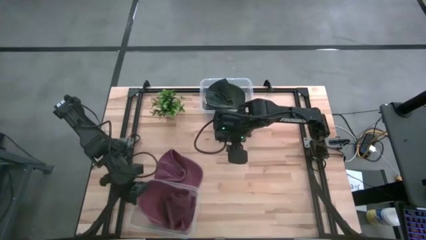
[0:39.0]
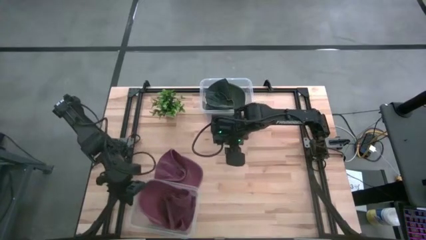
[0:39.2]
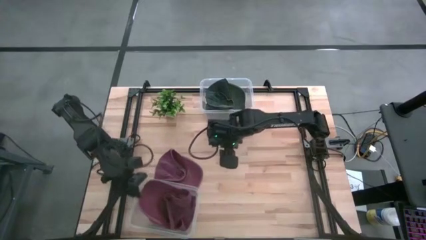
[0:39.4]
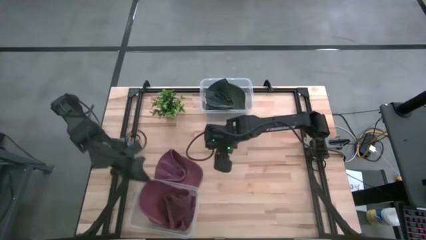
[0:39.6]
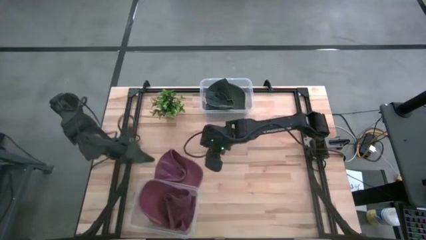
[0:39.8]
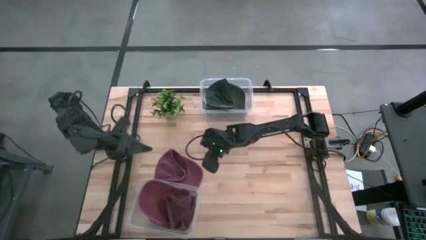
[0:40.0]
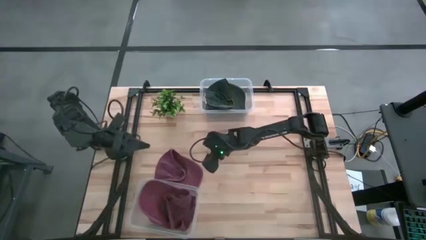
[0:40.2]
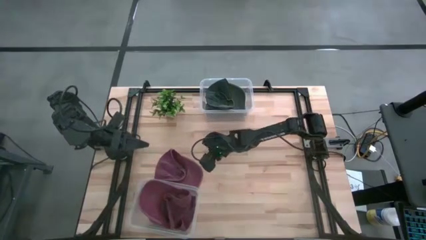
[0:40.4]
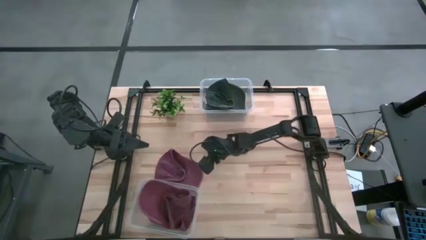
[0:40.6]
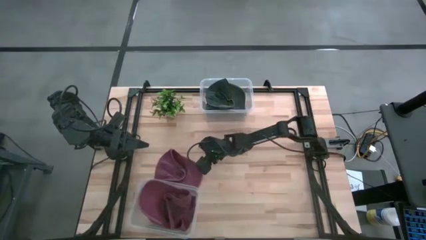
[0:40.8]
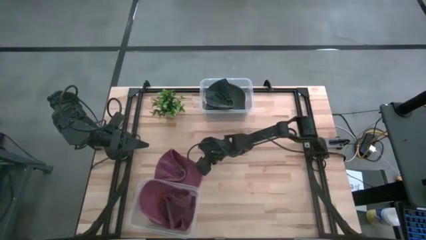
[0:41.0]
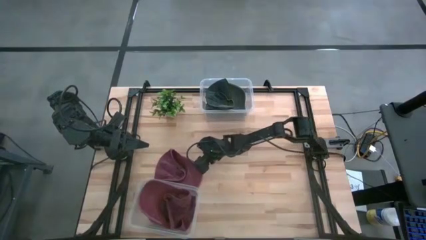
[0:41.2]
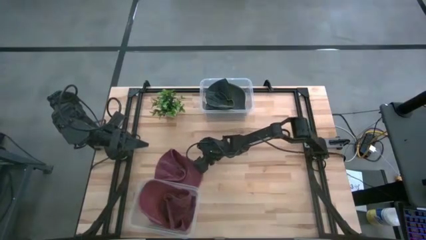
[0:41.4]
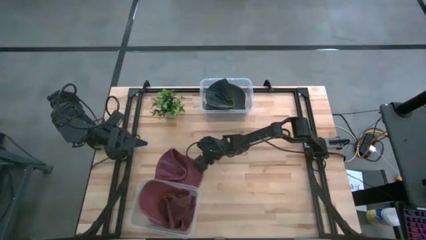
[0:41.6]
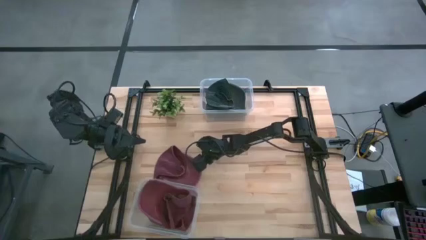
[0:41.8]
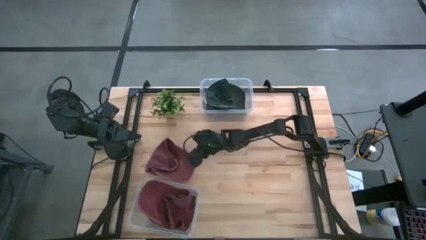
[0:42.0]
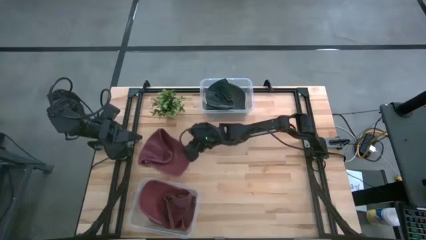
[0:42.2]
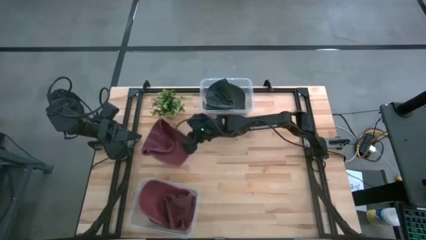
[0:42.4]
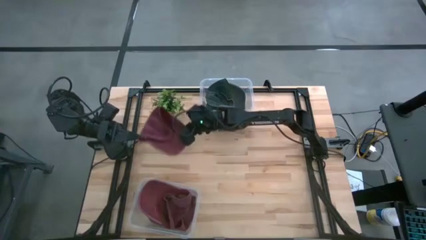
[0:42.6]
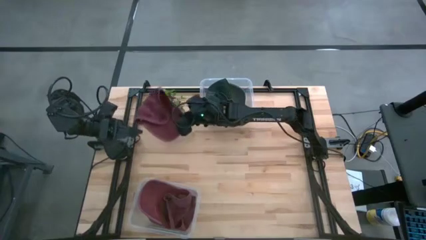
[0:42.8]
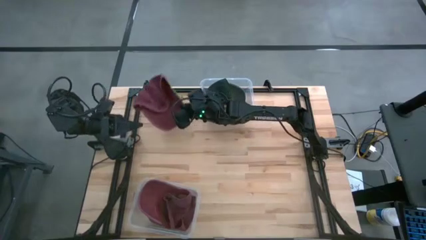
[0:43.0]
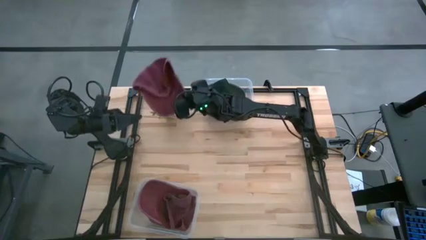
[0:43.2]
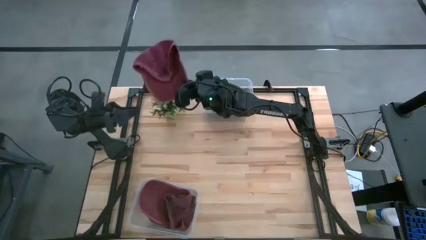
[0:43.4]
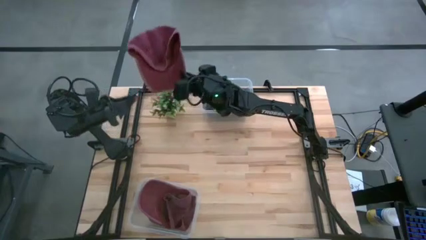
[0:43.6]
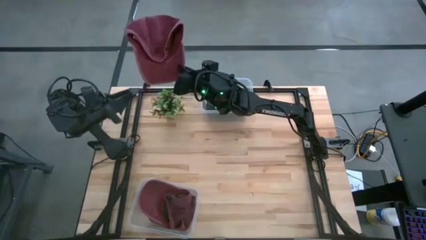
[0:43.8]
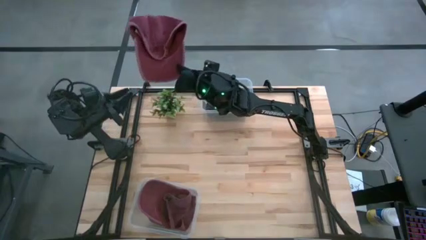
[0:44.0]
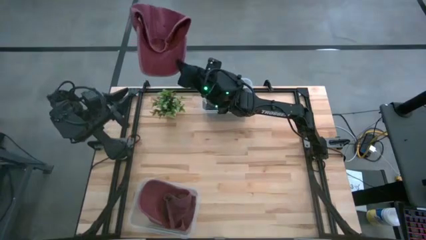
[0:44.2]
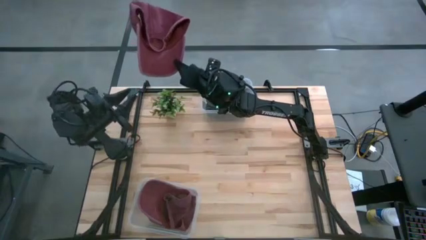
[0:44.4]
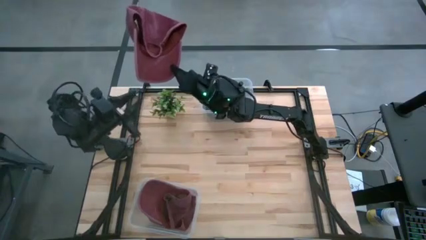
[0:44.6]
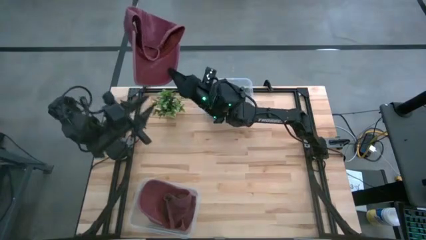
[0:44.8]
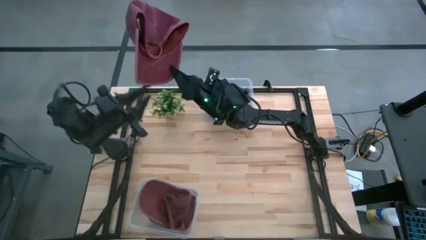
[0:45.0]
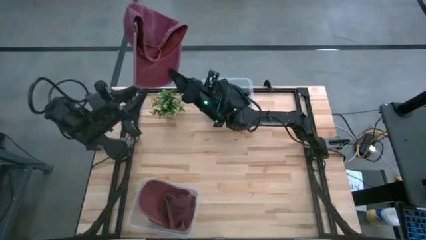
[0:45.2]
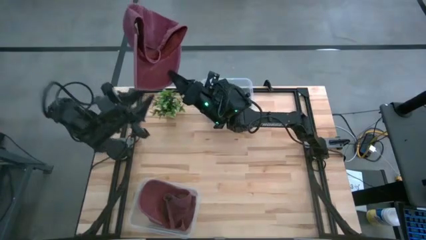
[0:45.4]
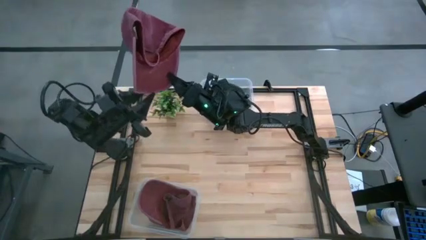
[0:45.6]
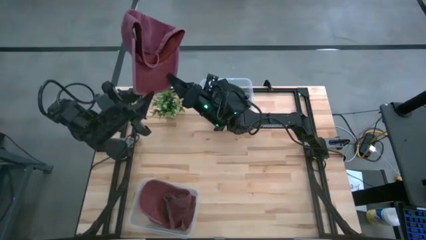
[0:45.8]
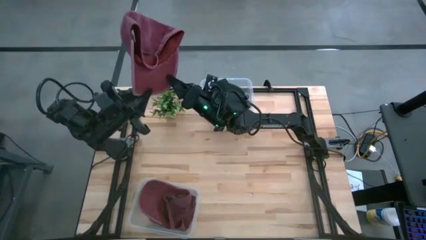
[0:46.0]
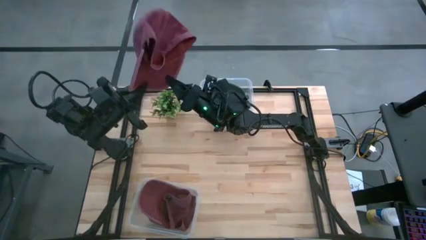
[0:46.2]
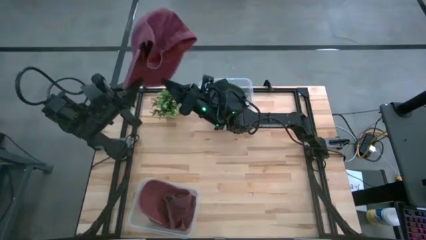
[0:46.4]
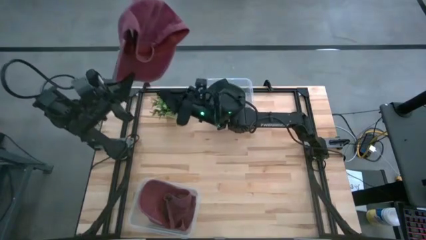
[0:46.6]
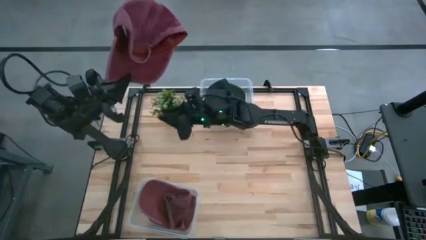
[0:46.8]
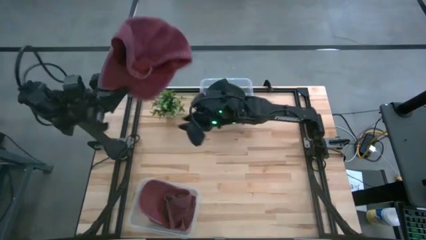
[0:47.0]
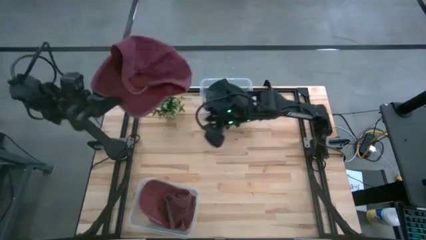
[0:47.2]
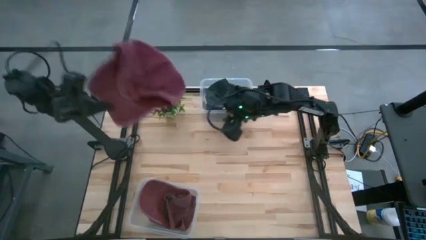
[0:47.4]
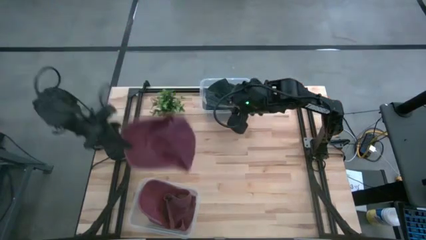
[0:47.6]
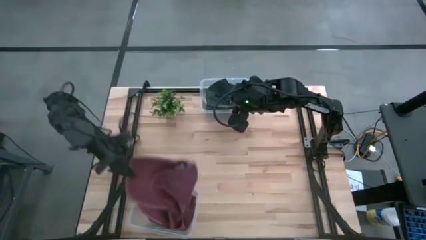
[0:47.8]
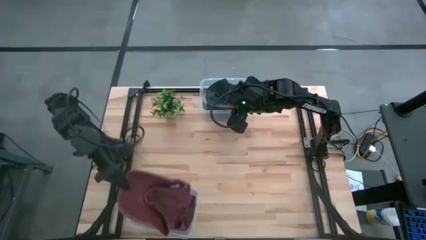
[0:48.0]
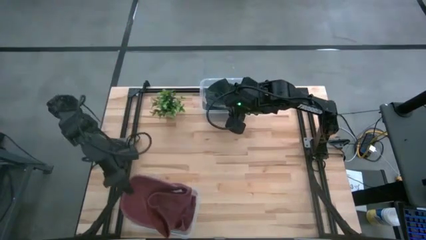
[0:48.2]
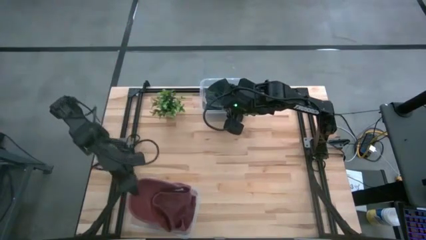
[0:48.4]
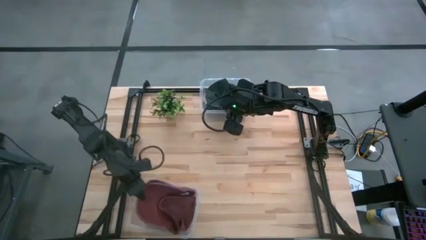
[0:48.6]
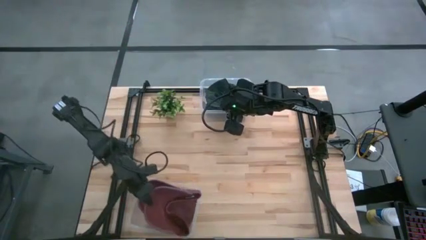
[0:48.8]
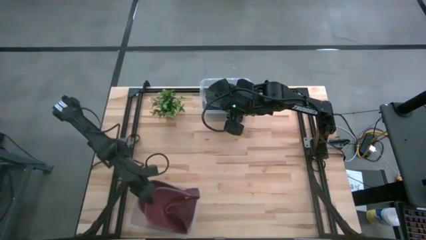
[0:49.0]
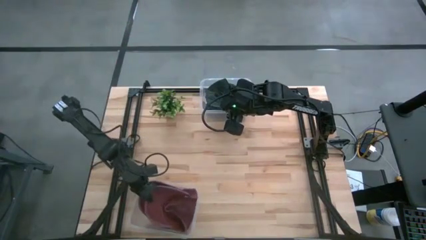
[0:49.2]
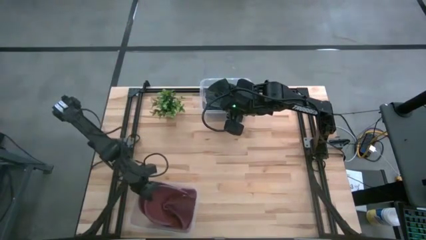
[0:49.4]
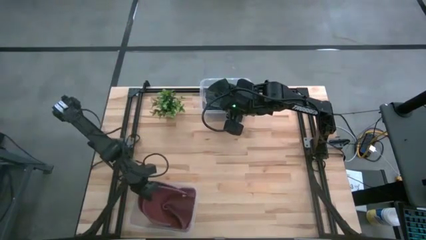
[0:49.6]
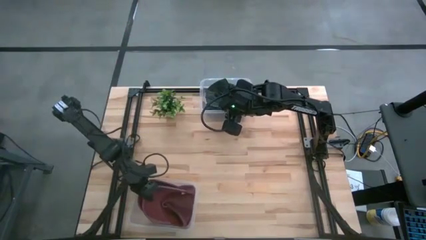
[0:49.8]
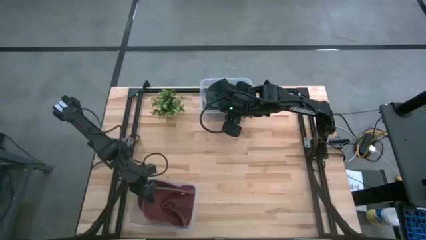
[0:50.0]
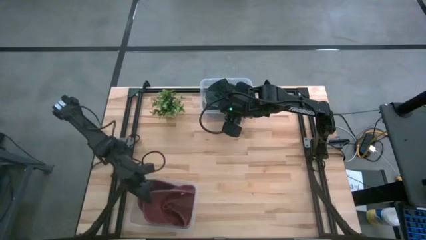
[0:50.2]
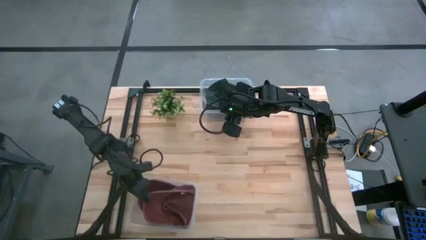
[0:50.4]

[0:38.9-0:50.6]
Task: Pick & Place hat
Put the red cap into the bottom transparent bin

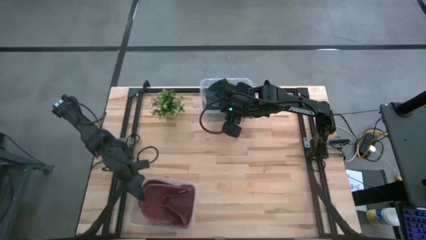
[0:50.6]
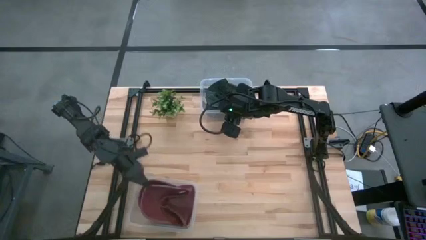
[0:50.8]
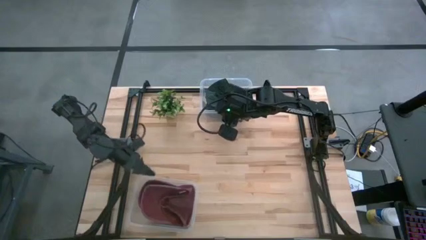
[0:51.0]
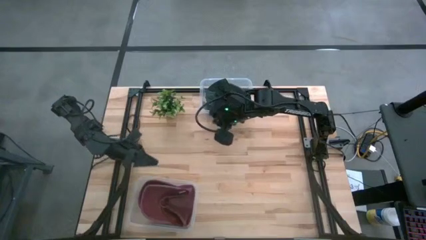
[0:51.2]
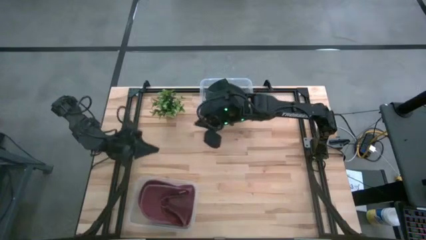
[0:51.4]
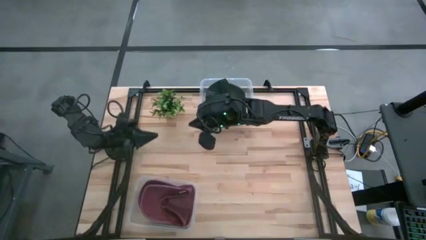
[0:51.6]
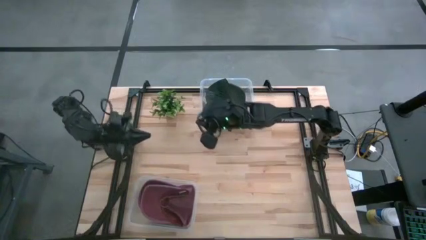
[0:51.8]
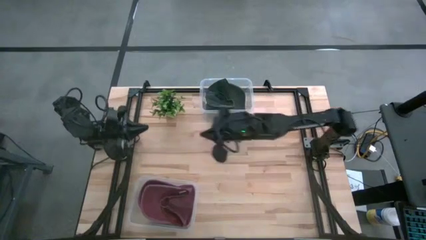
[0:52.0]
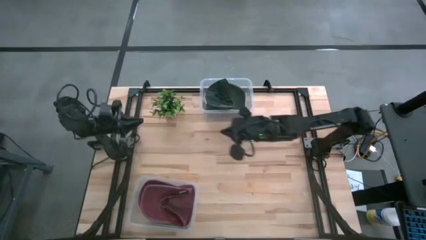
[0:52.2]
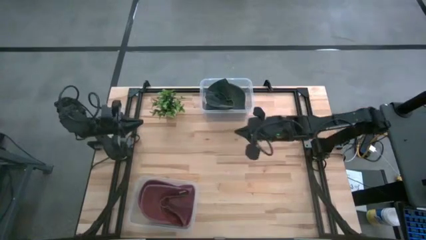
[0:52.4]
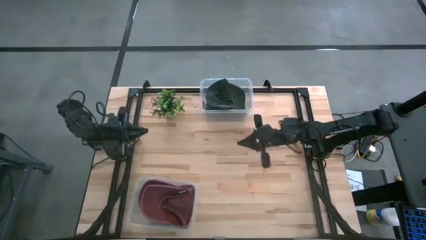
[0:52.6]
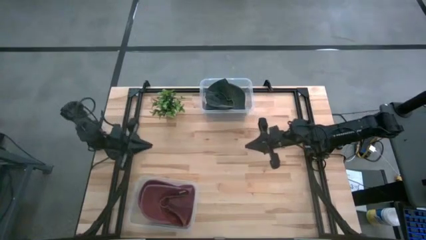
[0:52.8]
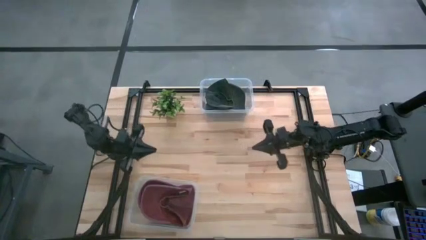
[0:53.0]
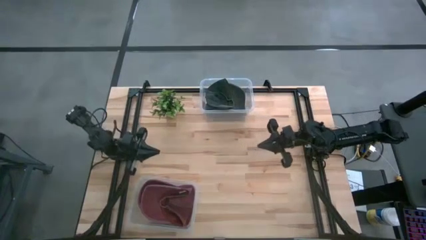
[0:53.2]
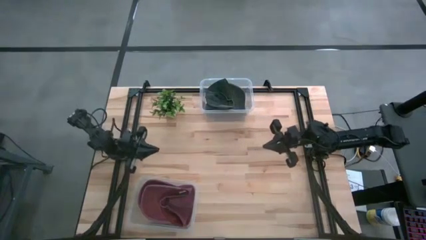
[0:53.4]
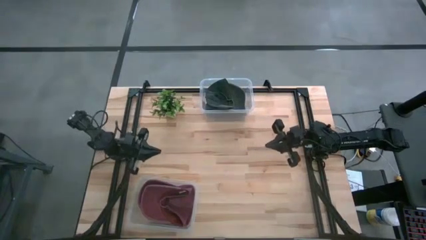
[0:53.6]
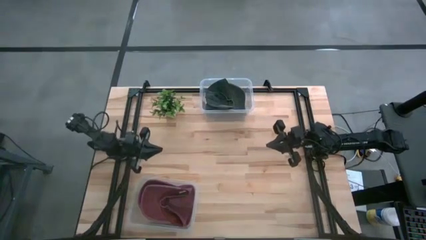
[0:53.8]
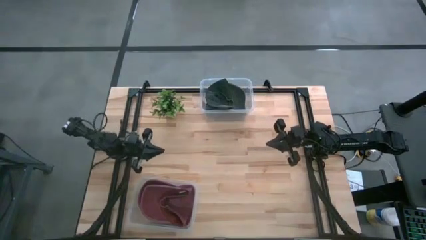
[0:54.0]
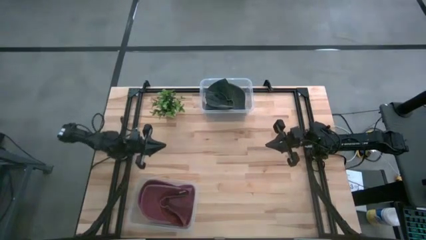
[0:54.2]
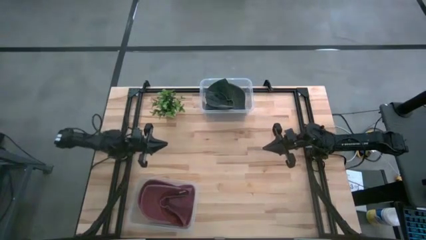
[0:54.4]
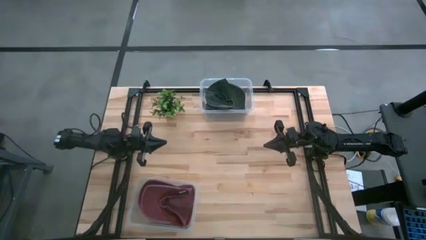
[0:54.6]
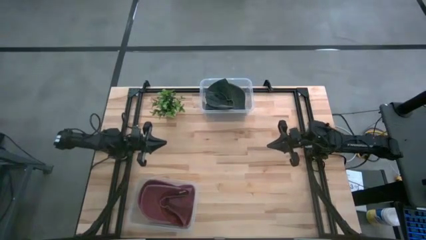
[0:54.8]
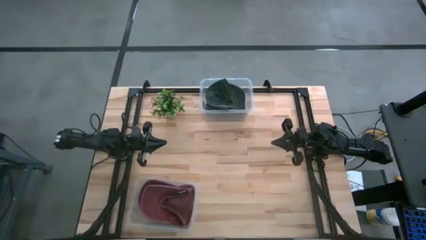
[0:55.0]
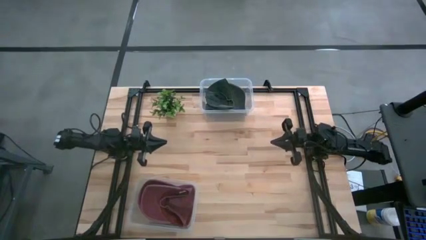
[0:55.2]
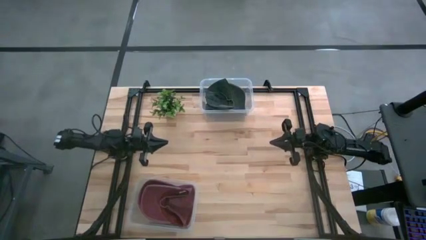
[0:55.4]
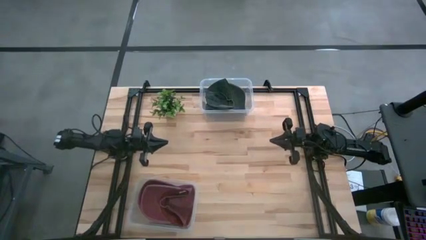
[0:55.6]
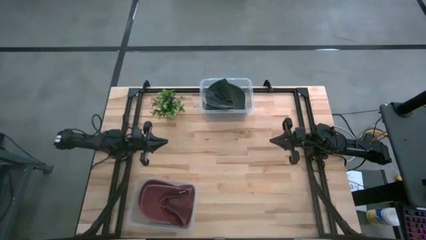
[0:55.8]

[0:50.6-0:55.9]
Return to Home Position
